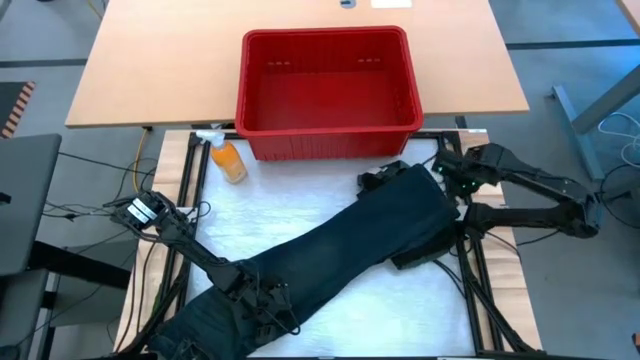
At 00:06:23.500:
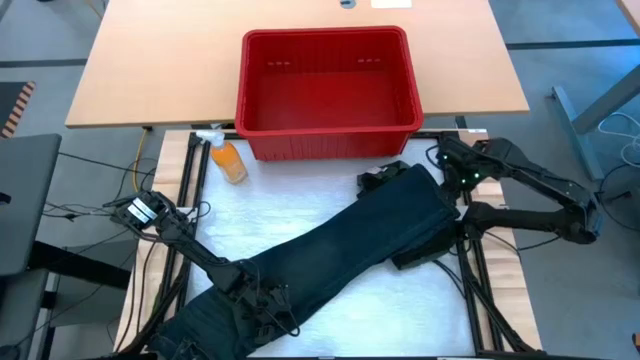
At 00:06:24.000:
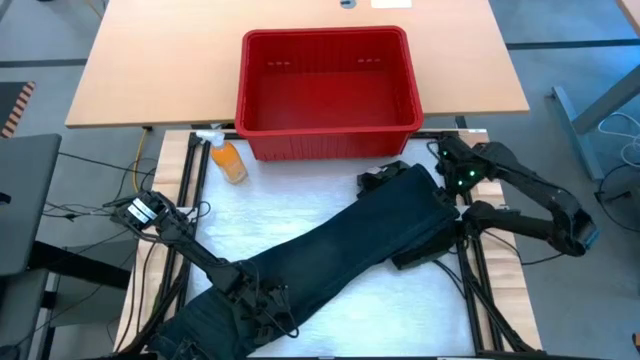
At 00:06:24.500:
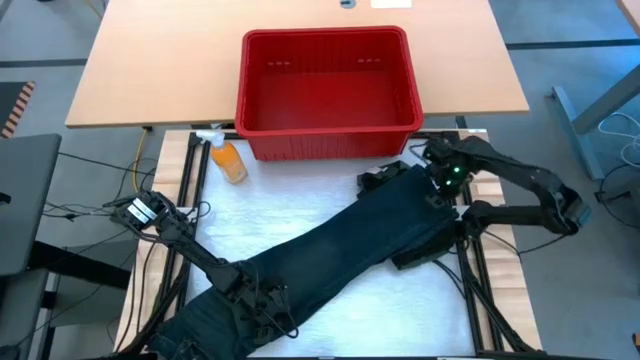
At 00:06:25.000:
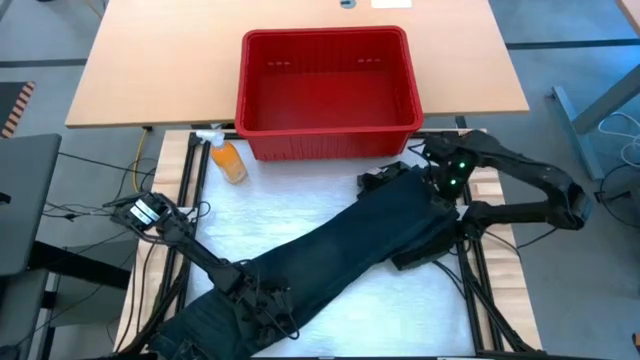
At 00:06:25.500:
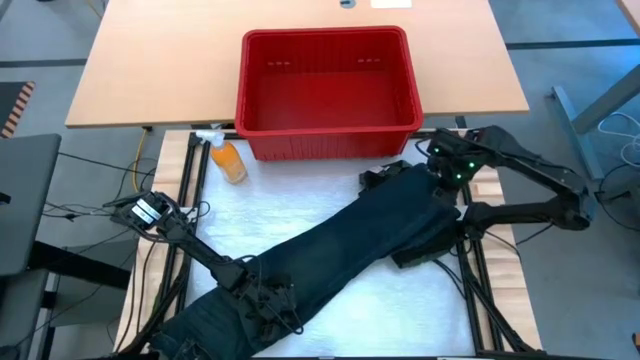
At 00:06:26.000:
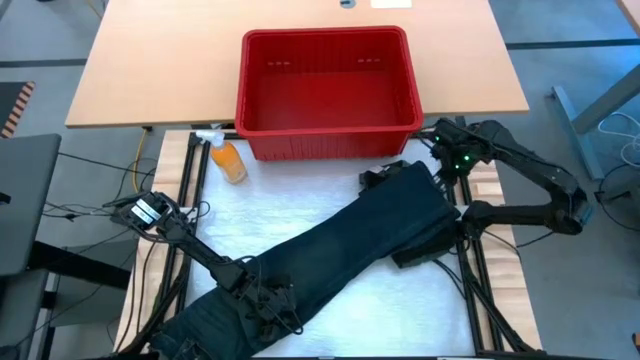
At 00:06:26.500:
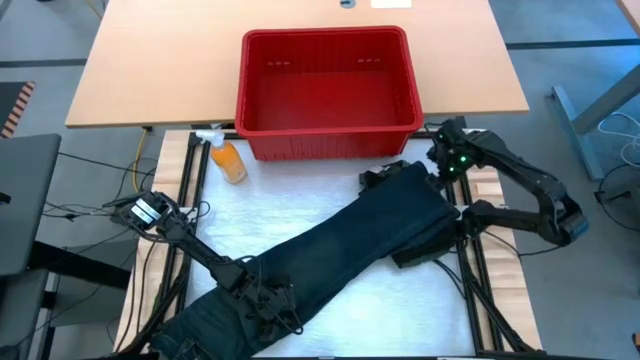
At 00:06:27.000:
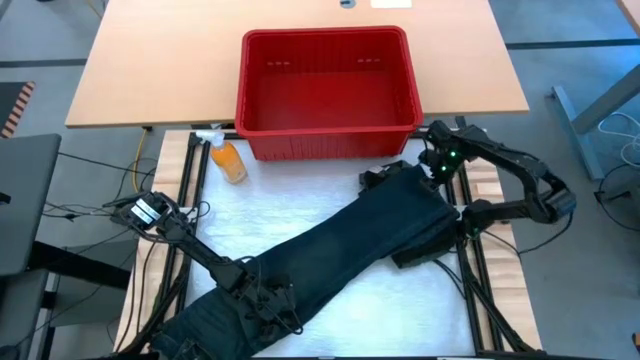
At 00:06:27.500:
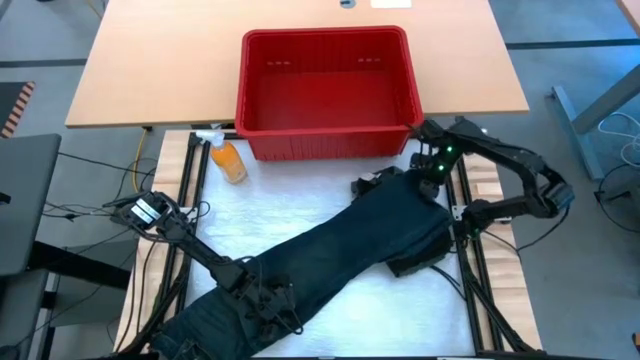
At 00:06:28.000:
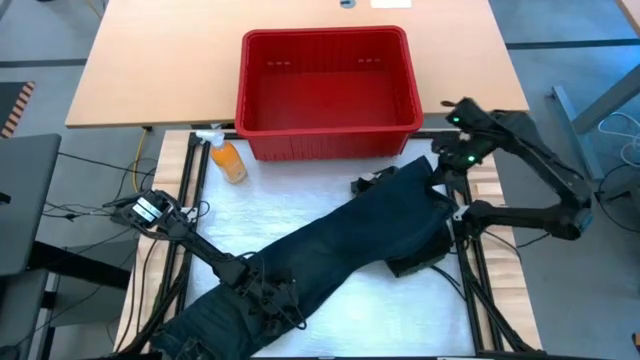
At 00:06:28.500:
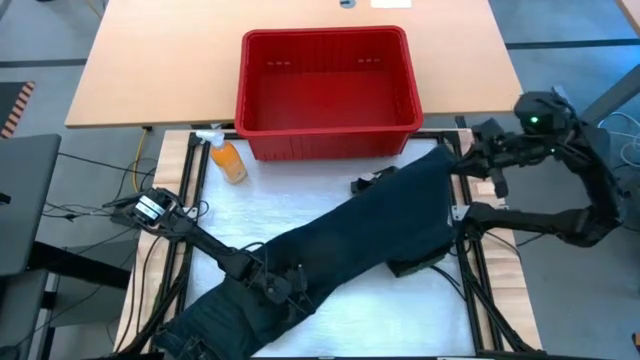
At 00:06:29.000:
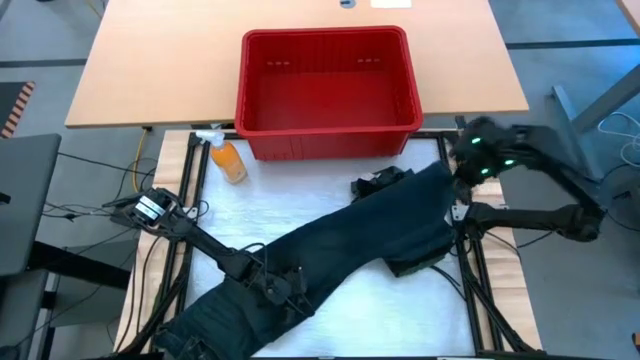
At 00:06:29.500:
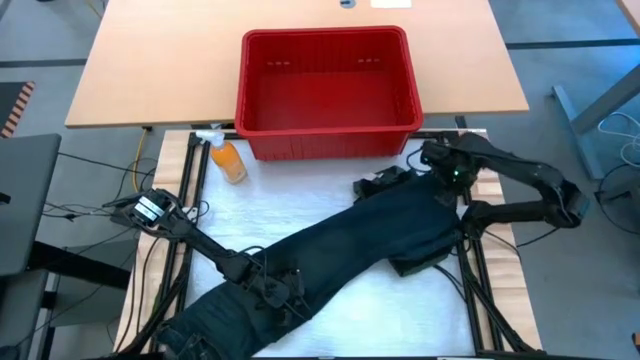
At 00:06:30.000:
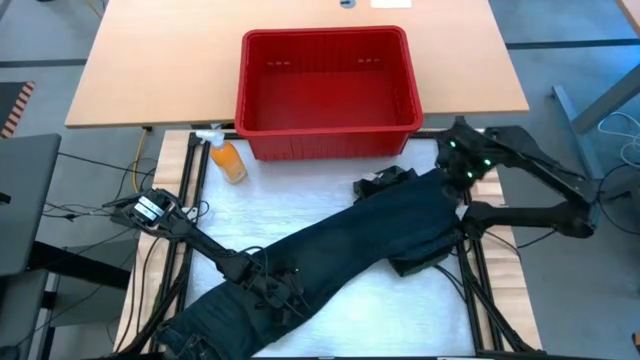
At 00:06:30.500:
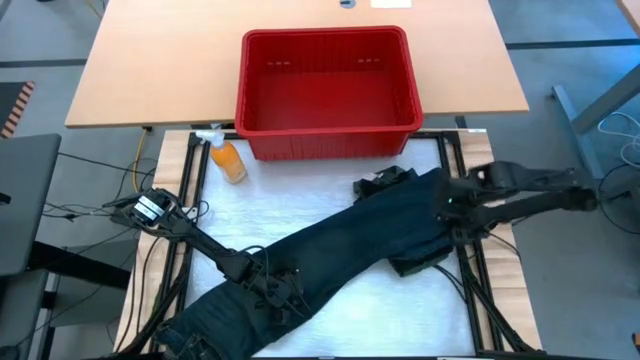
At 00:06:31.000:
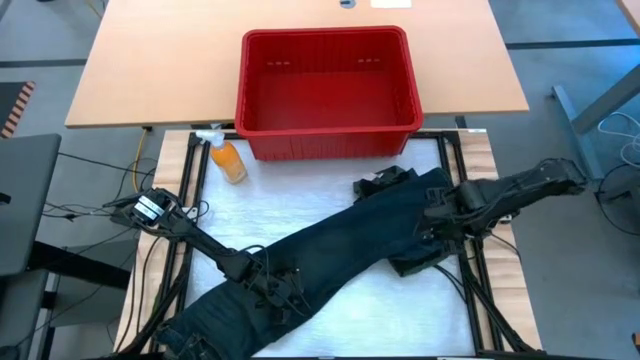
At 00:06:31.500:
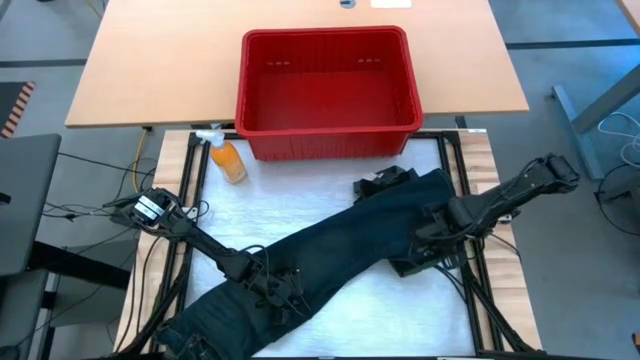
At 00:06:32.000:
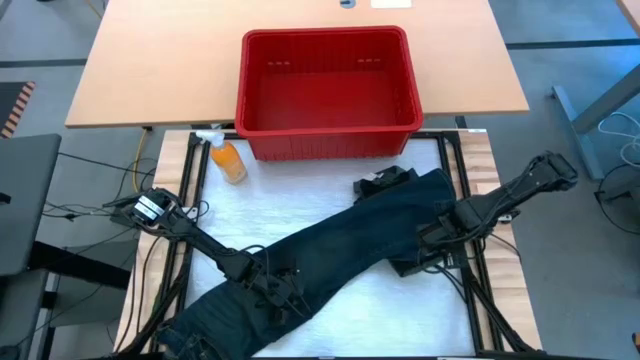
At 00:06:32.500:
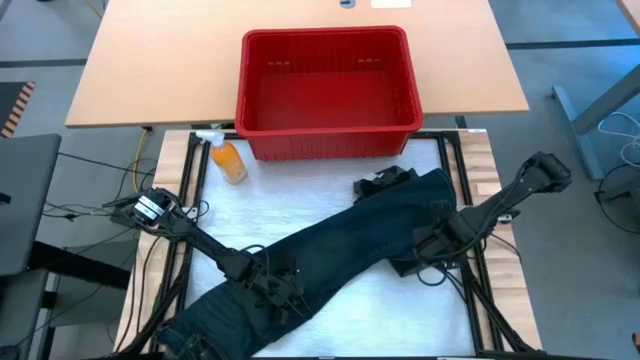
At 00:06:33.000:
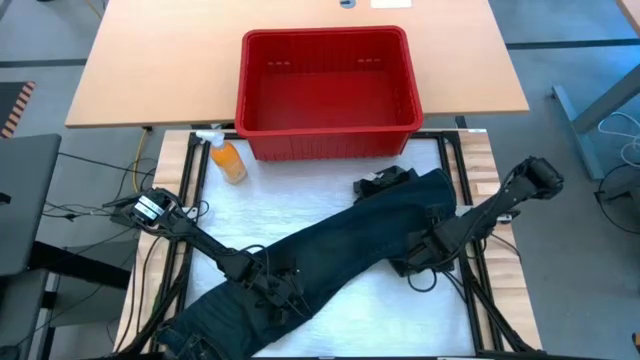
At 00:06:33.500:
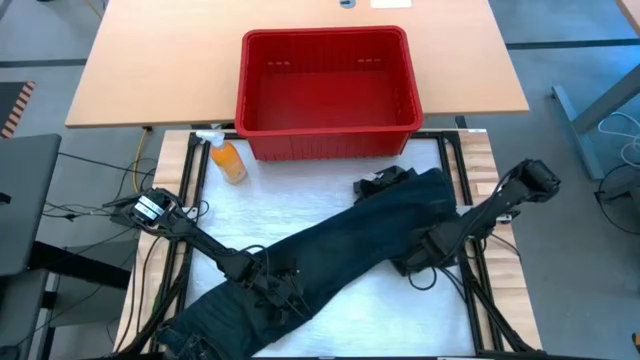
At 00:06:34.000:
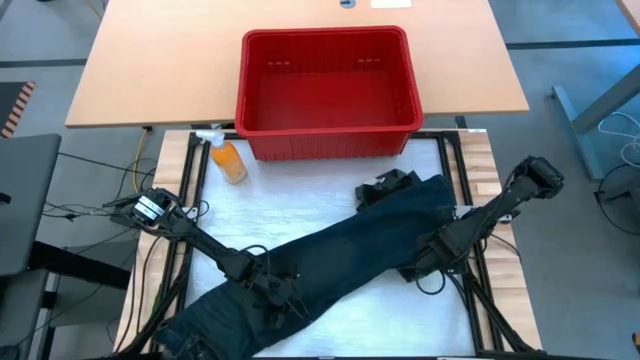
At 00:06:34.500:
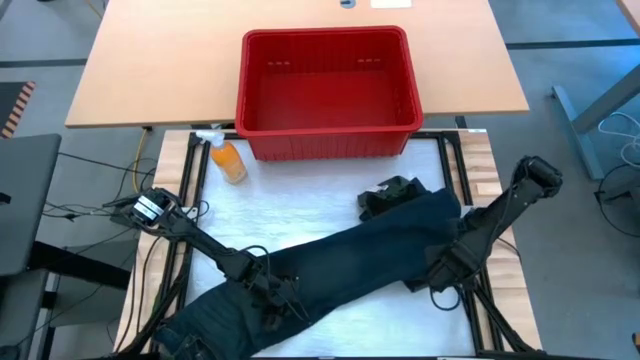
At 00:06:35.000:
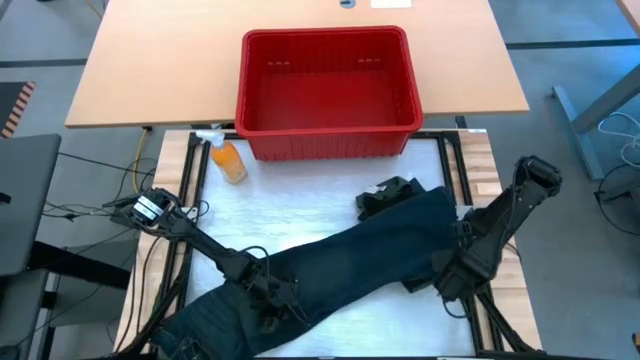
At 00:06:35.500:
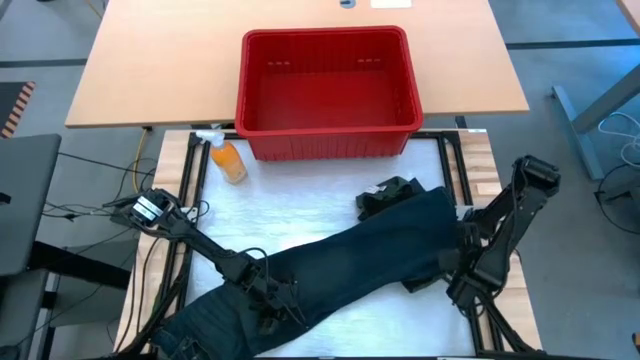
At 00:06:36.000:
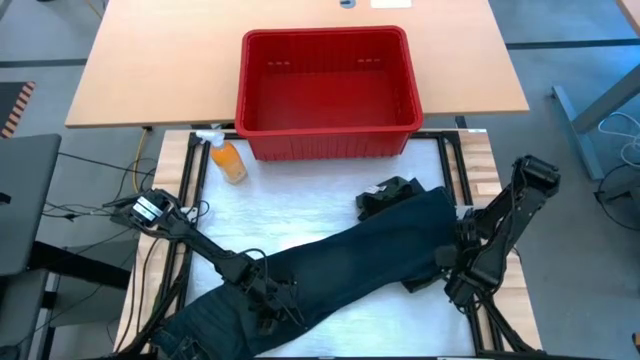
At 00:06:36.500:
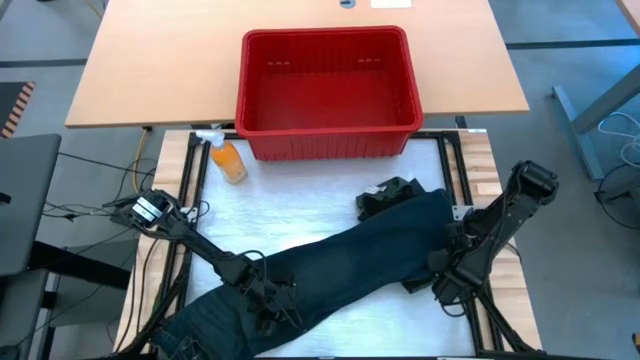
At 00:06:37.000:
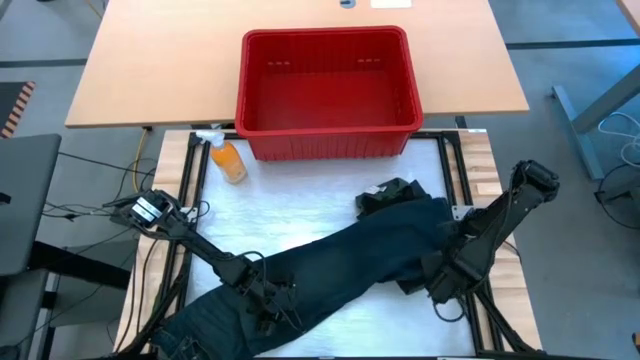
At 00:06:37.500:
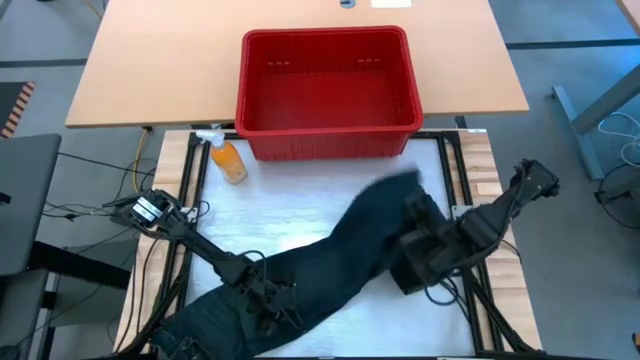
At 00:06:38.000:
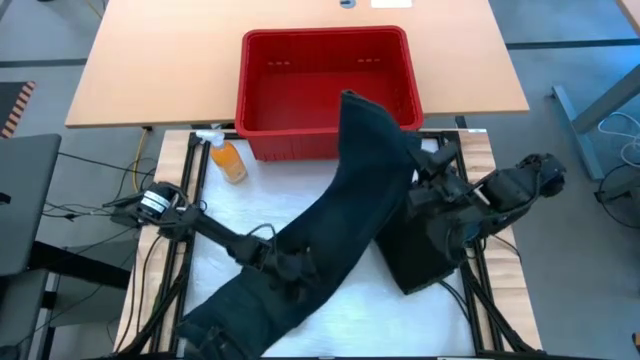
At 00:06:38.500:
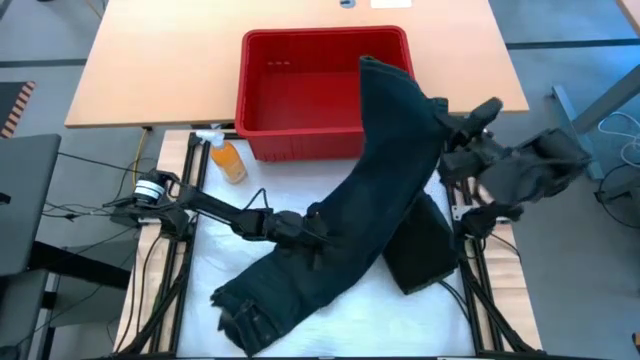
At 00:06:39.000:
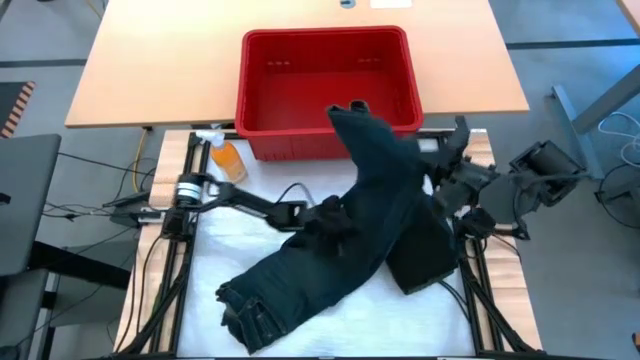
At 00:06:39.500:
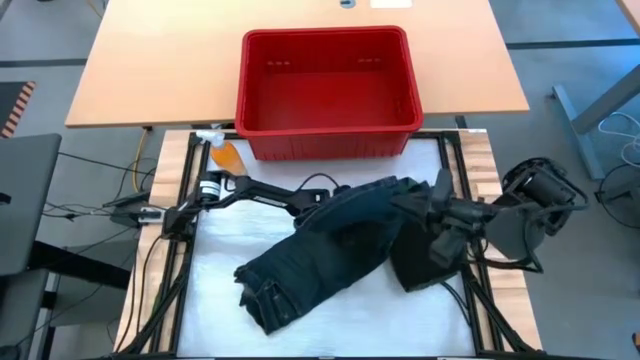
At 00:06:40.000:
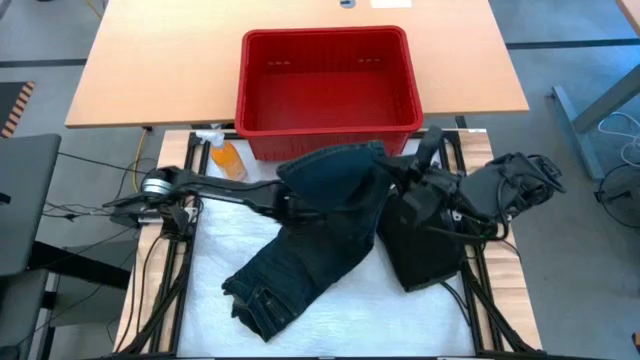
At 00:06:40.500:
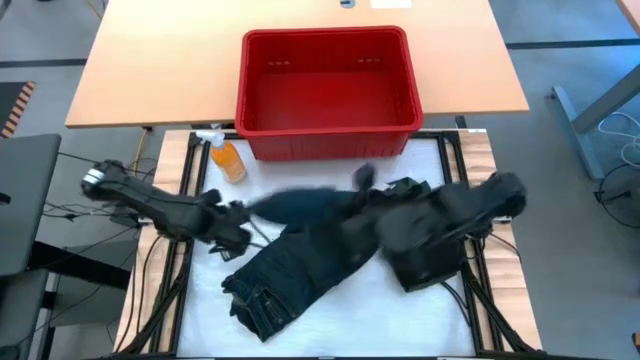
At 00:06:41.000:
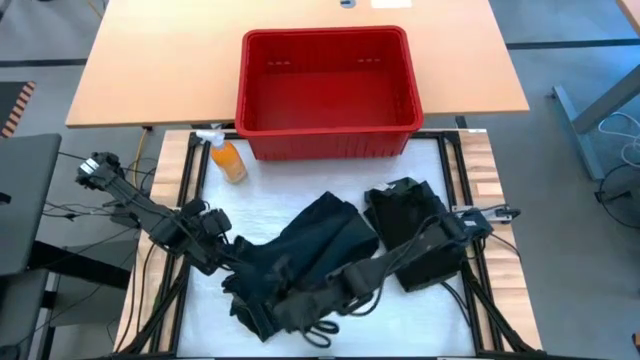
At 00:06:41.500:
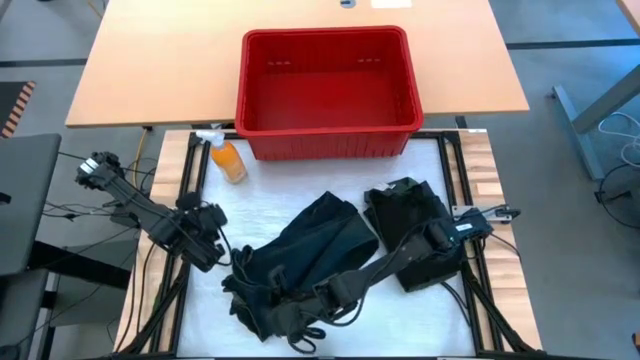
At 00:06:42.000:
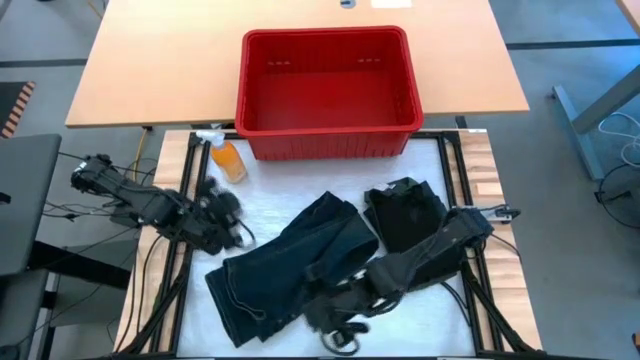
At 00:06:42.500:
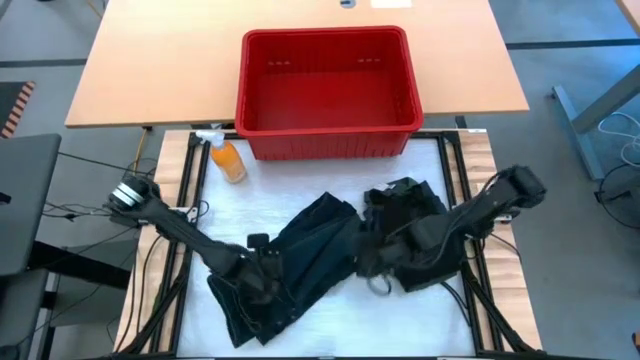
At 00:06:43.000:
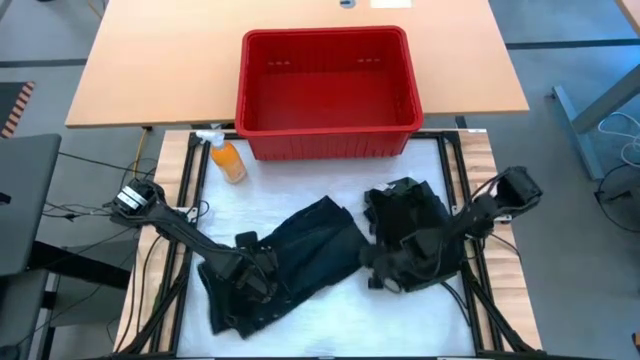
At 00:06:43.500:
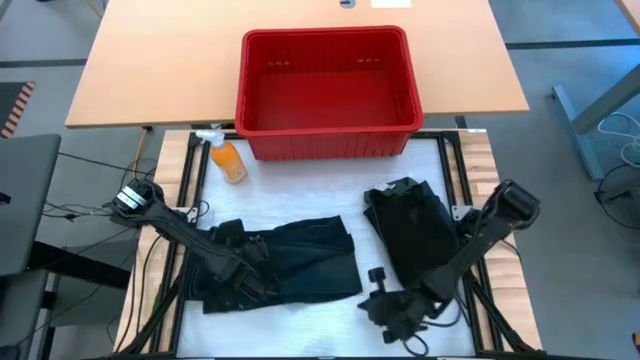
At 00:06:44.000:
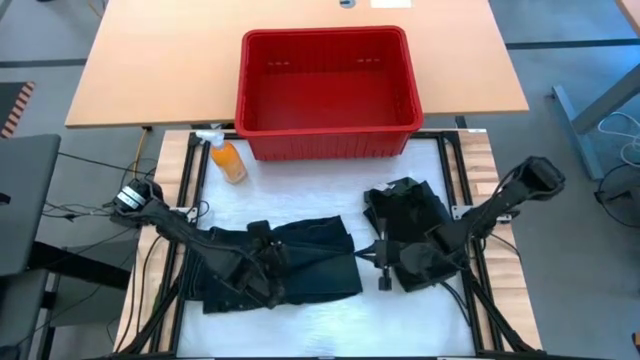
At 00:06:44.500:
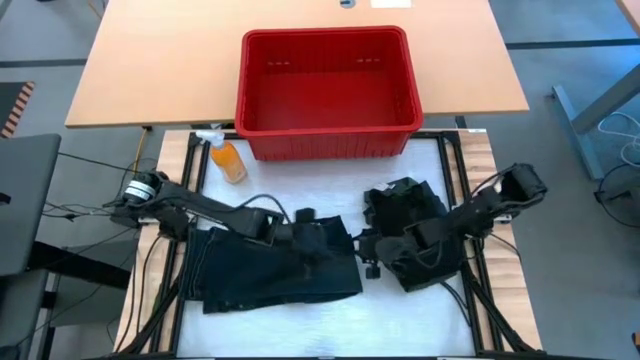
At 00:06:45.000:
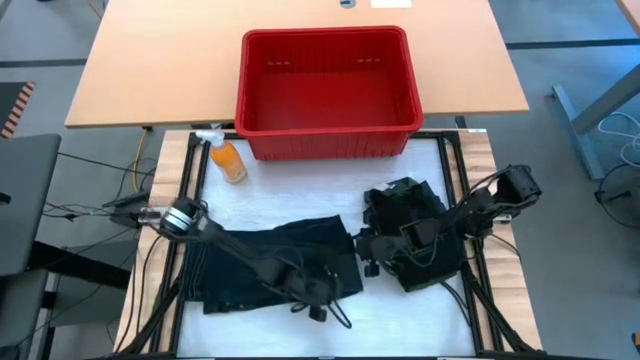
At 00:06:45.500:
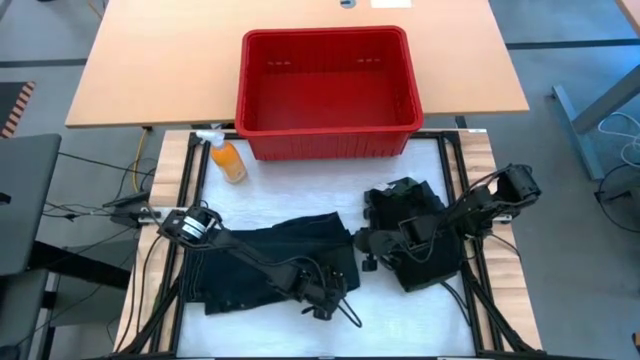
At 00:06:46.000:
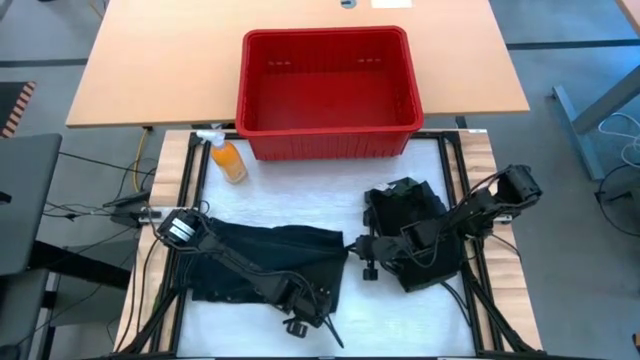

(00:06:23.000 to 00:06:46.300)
Task: Fold laundry
Fold the dark blue jeans
